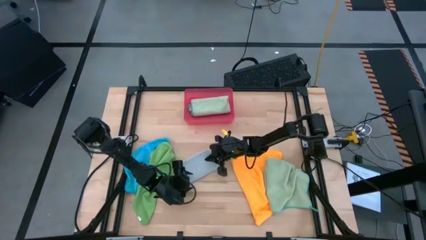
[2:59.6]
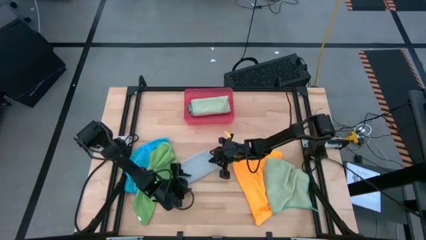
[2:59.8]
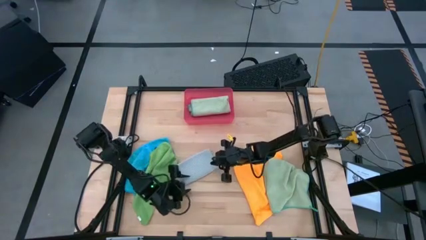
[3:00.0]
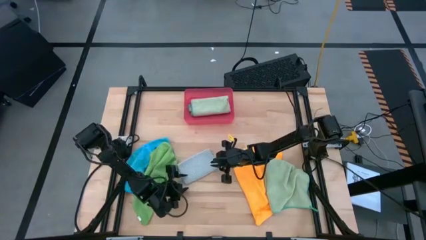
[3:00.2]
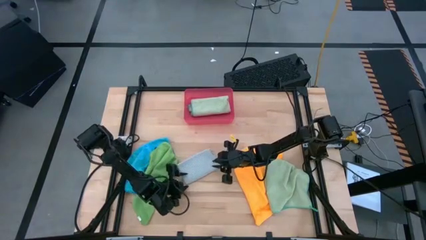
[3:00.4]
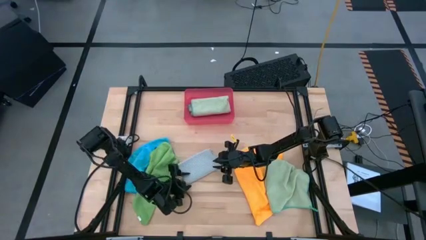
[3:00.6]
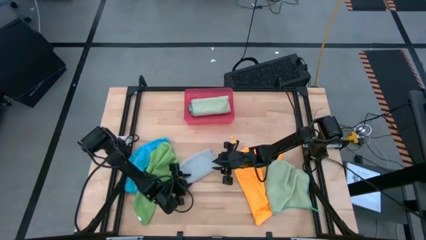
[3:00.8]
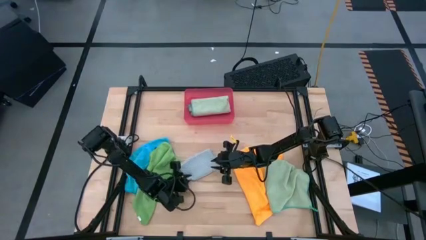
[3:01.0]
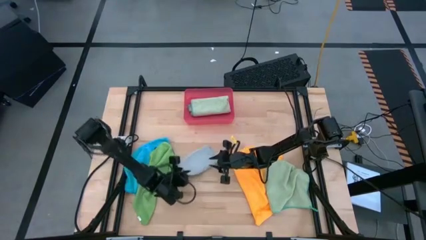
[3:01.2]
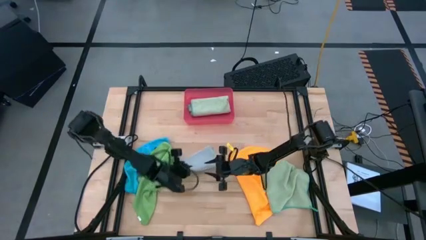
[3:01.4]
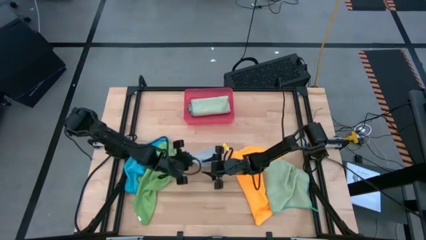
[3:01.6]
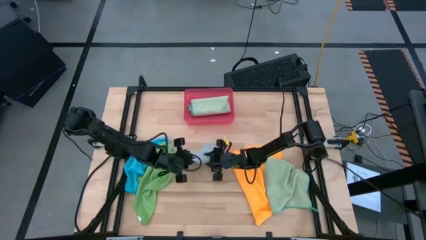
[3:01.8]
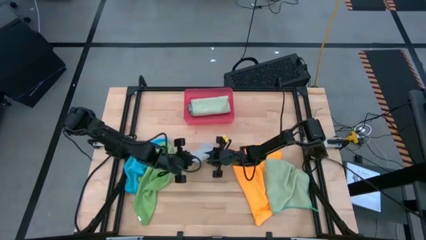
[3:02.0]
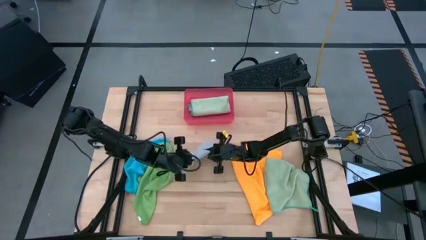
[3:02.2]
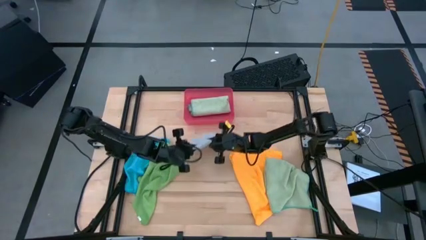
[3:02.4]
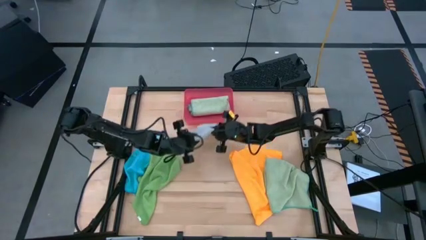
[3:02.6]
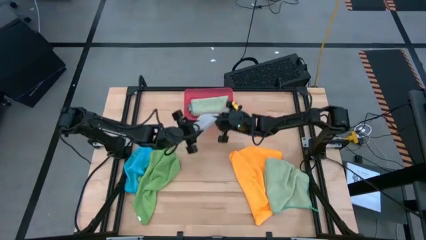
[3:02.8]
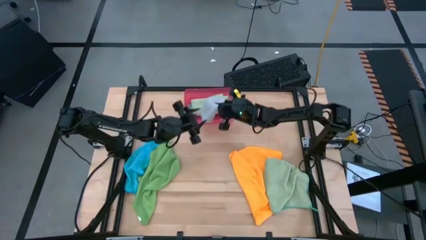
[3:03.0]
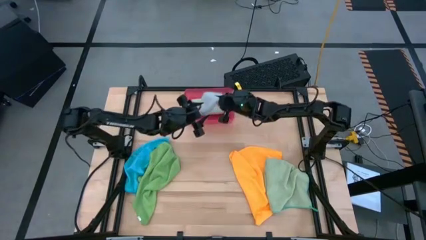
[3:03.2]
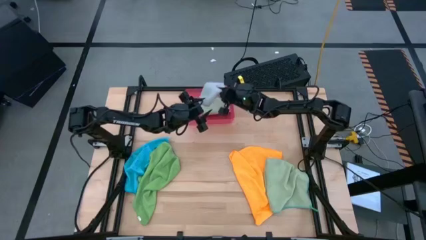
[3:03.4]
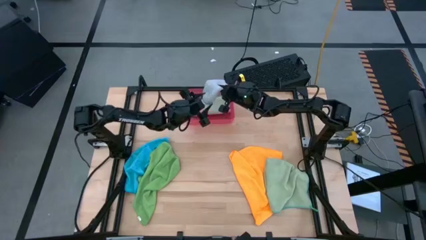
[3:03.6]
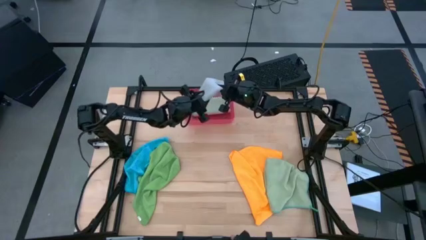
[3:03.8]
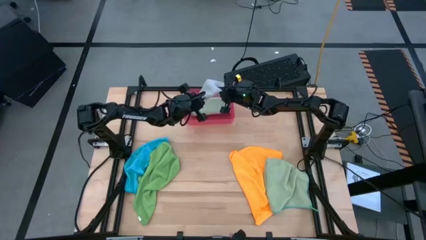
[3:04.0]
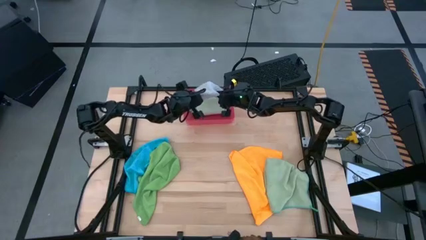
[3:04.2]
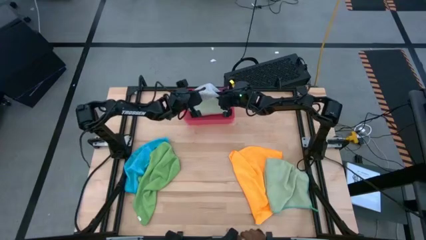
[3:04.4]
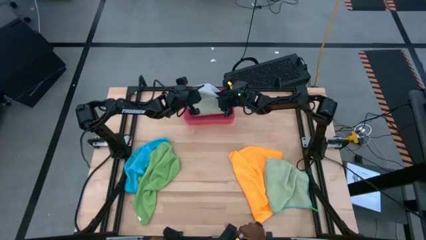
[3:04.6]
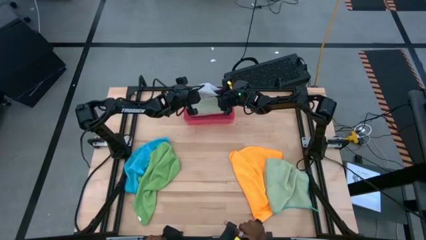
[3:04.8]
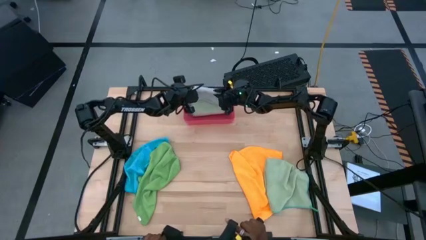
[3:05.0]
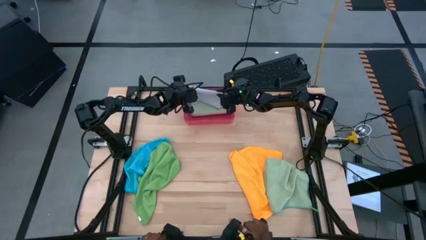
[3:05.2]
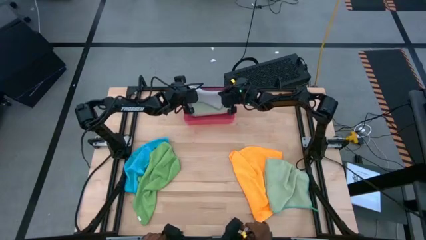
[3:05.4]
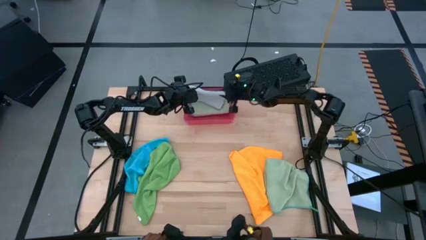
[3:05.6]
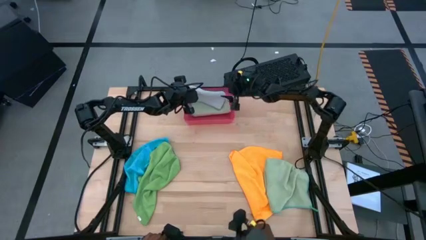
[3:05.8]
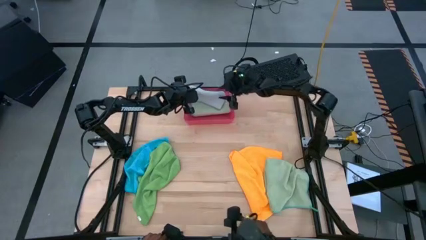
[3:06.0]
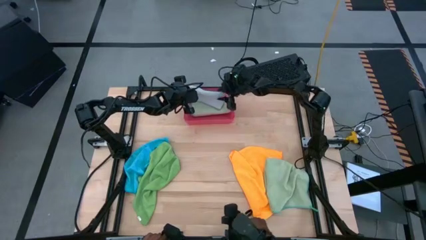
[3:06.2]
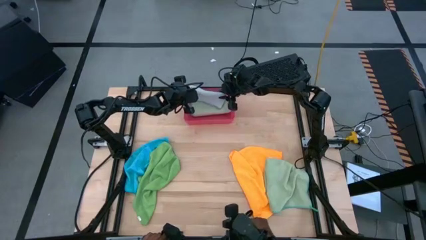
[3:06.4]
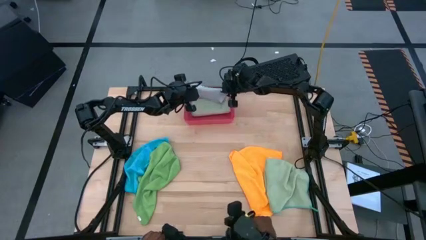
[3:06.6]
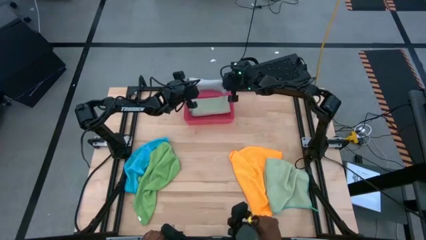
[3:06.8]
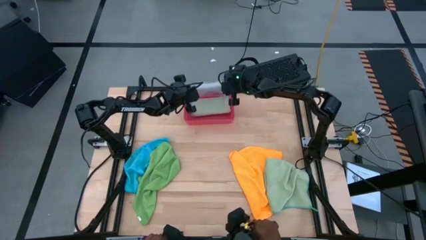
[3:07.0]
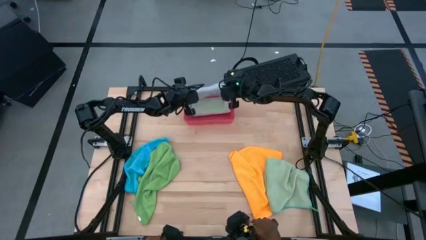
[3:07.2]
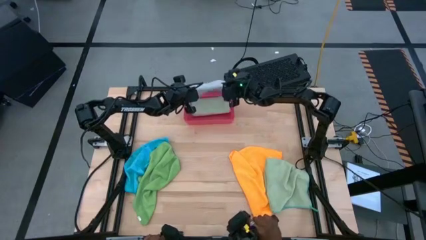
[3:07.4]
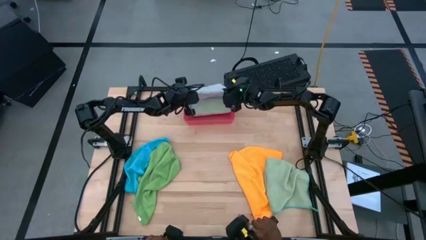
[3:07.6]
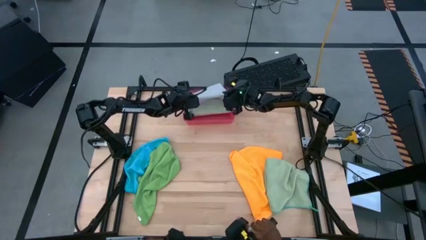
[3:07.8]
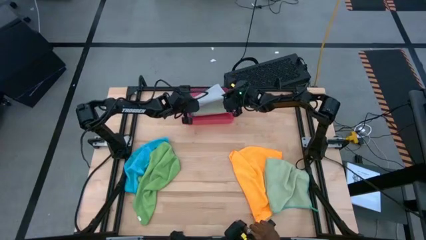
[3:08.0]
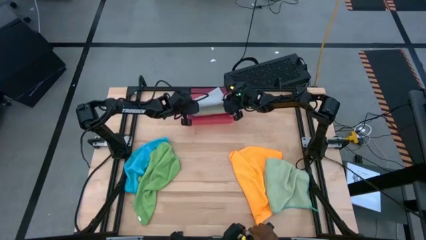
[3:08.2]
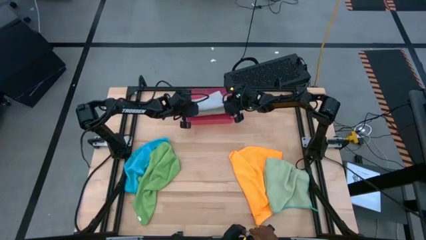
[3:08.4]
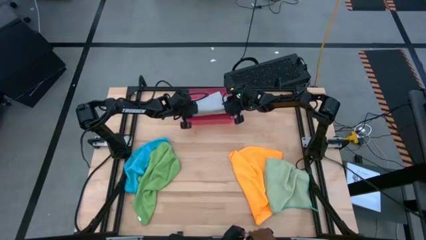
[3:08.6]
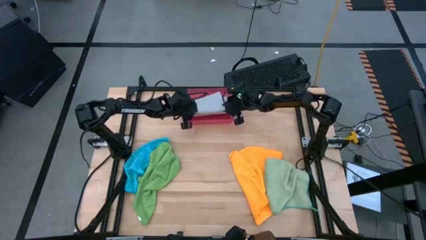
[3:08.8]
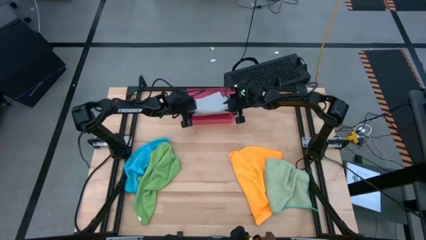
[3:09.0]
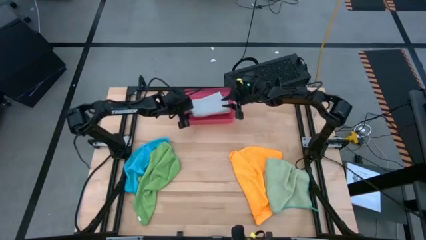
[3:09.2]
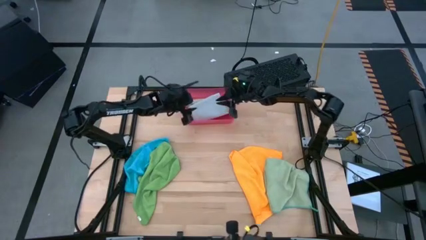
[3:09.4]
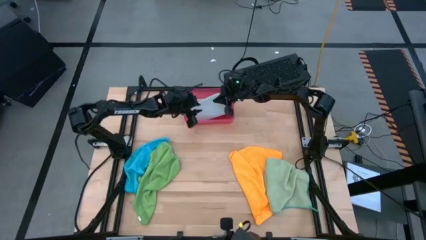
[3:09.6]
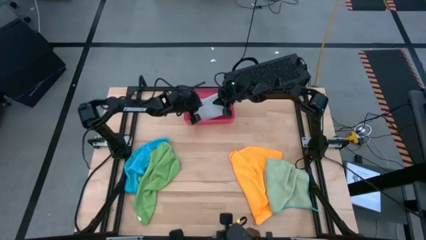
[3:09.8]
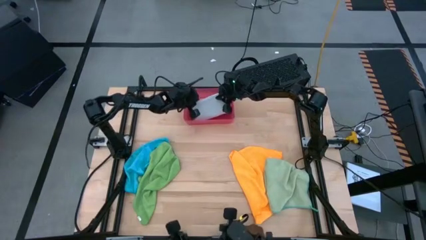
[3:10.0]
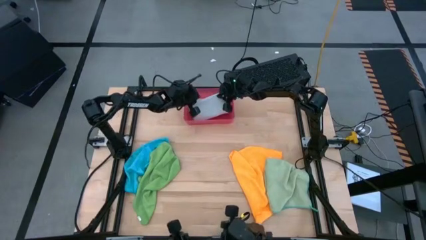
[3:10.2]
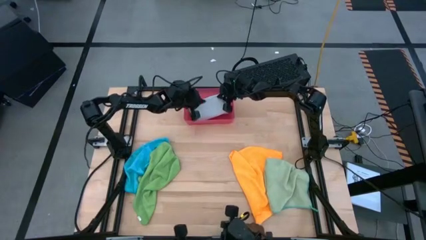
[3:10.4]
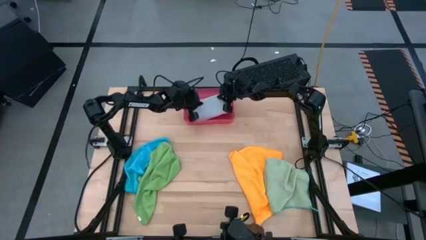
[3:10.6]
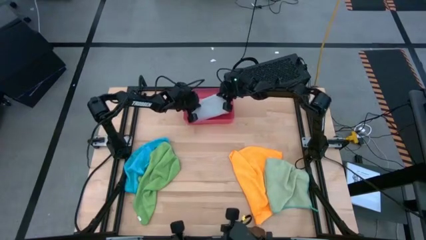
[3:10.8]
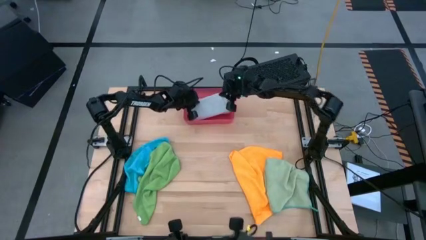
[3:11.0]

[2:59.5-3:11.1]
Task: Fold microfiber towels
Stack the folded gray towel on top of the folded light green towel in the red bin

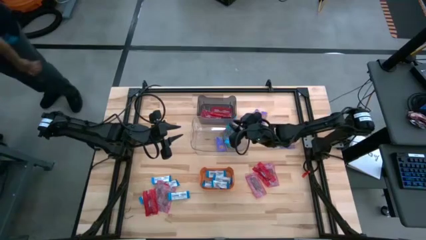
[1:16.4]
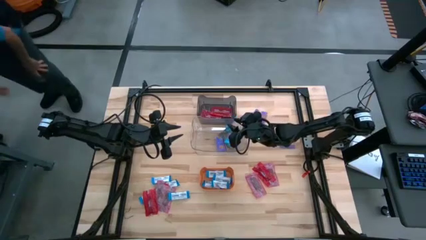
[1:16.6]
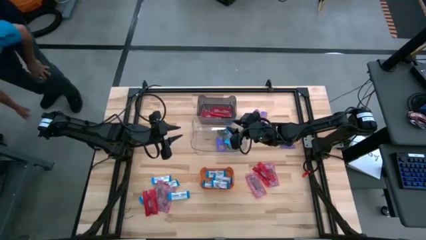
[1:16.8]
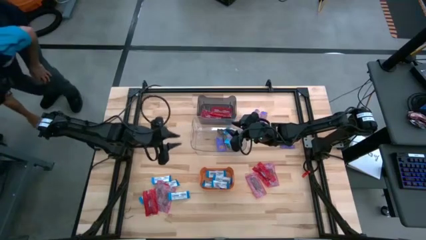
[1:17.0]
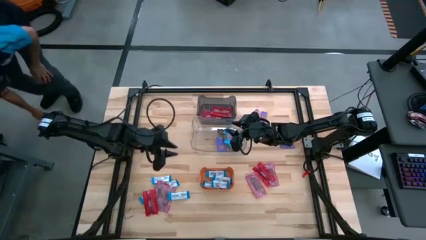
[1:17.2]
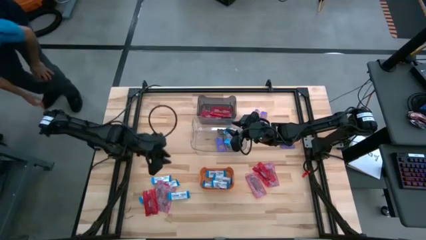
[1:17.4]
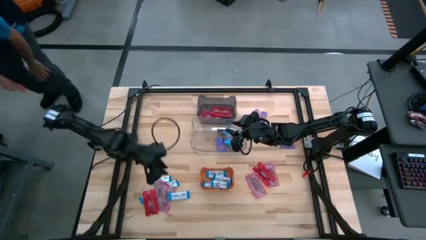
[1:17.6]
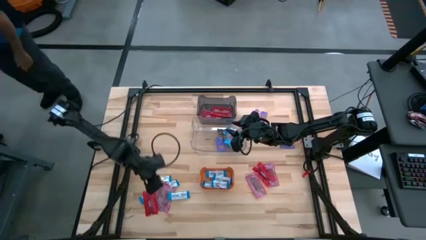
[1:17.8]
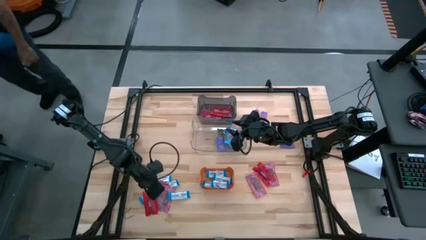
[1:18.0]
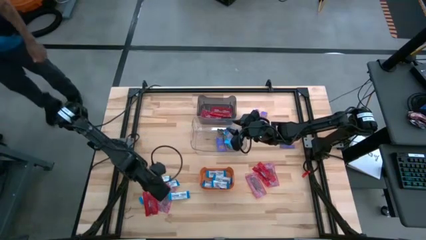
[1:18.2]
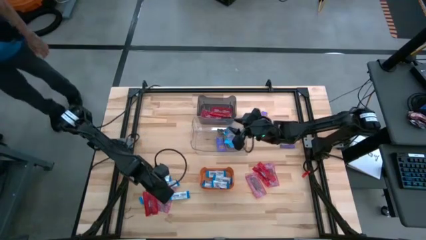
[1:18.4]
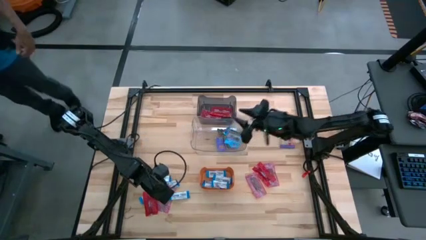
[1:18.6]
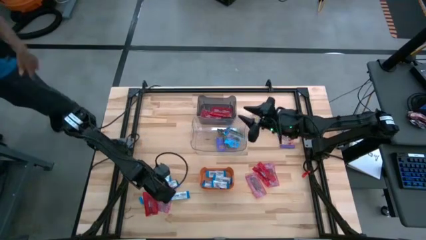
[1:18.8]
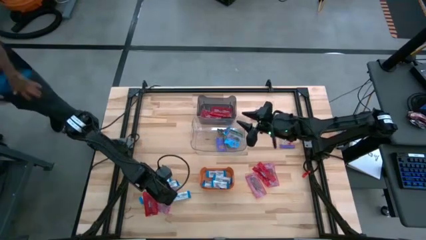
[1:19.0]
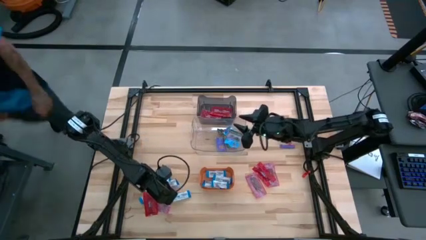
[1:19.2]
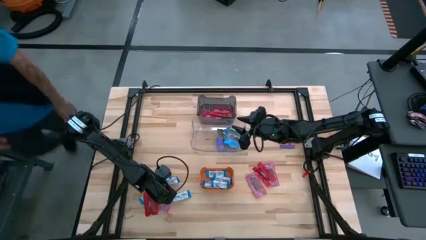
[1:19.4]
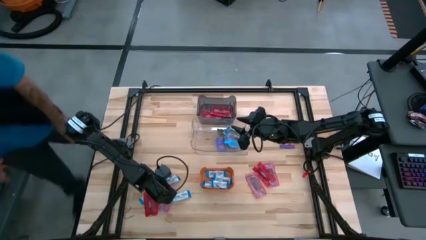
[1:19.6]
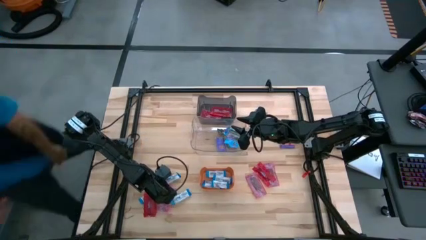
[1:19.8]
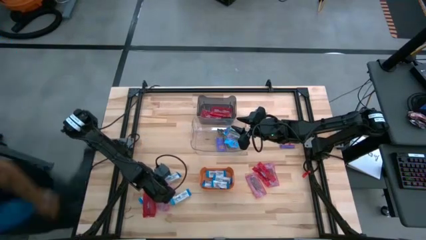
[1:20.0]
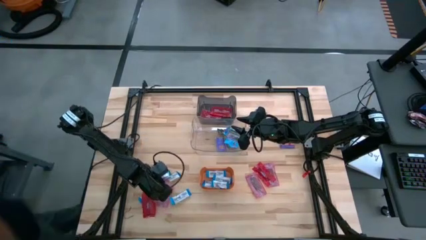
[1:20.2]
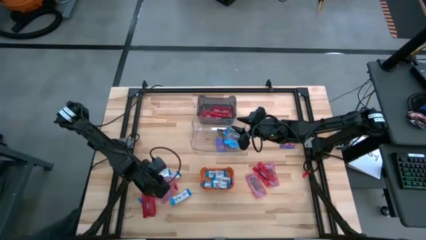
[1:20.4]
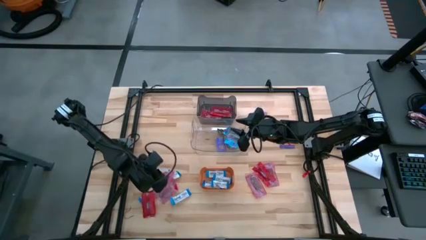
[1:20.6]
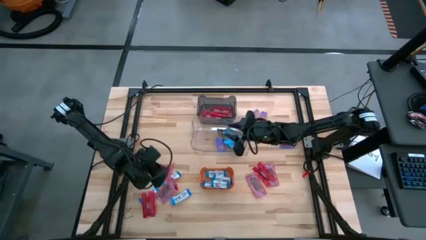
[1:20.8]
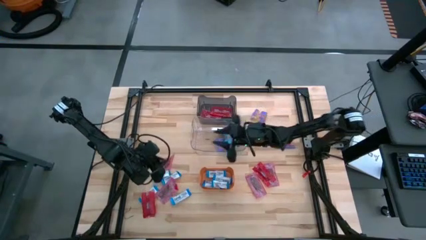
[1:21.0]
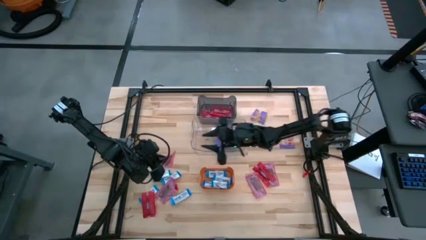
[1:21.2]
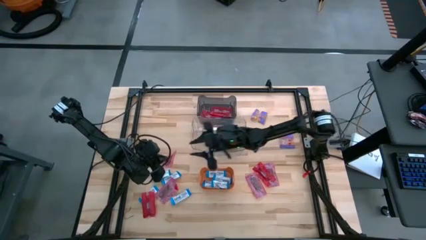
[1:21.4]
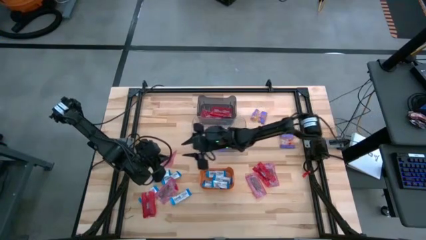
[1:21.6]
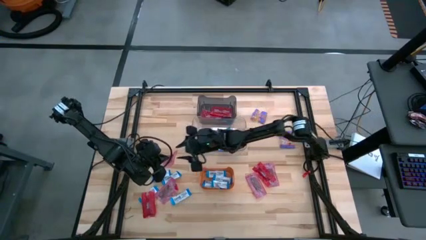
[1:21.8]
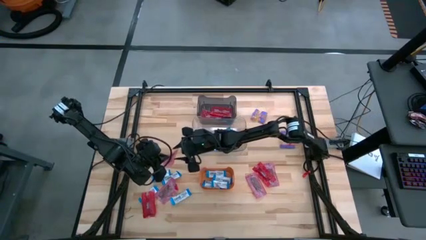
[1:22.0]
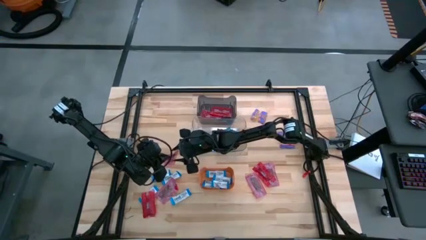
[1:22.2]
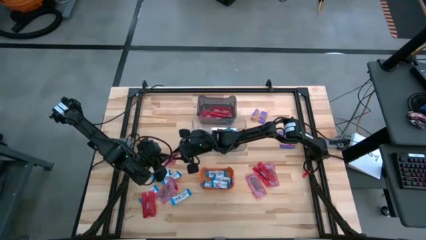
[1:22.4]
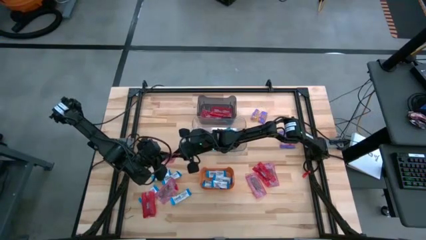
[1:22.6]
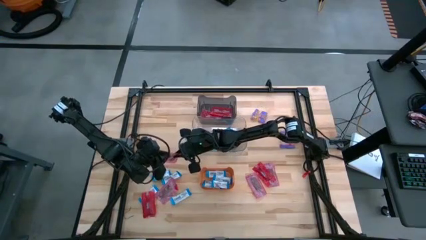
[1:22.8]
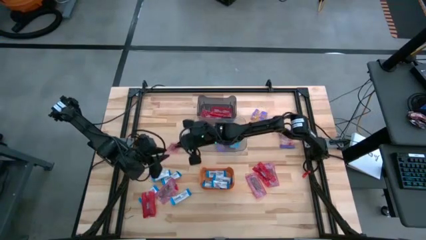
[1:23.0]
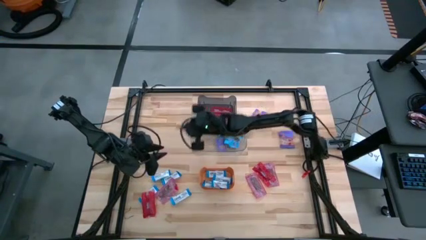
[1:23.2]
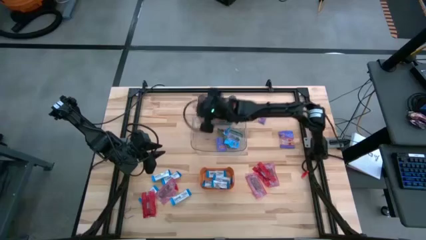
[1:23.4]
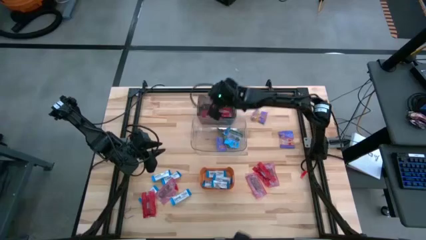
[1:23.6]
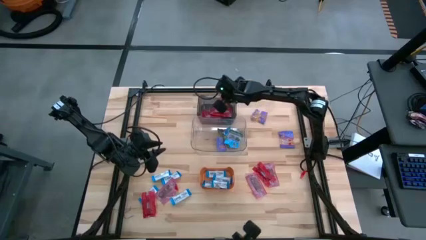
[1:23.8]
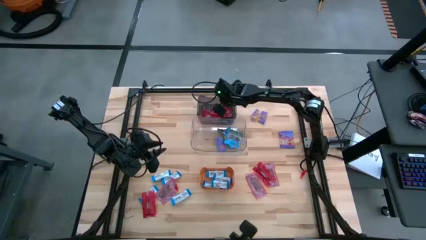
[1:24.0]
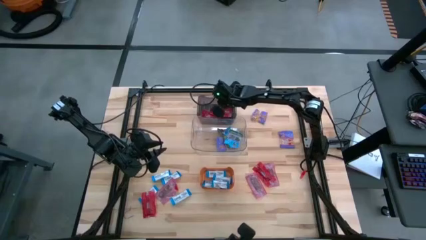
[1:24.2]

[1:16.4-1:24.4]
Task: Sort candy
Put the red candy into the black transparent bin
